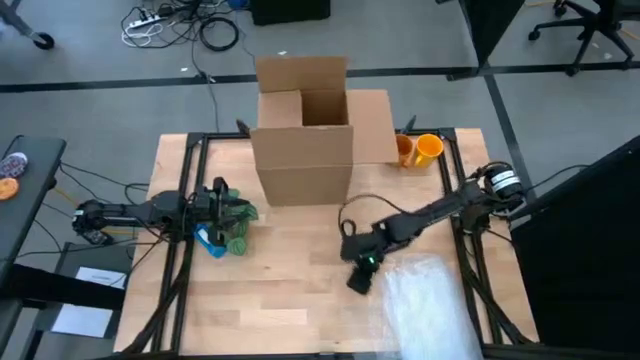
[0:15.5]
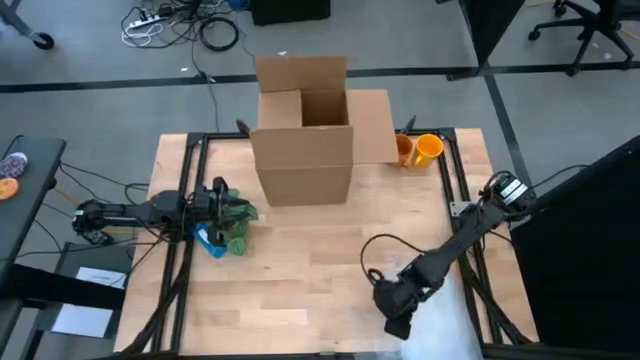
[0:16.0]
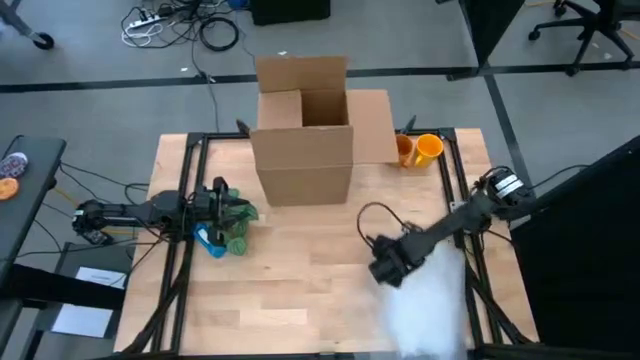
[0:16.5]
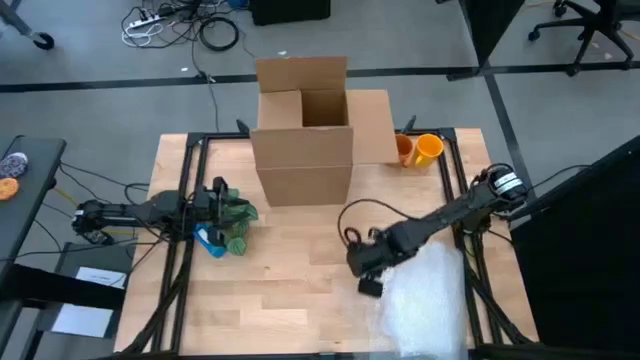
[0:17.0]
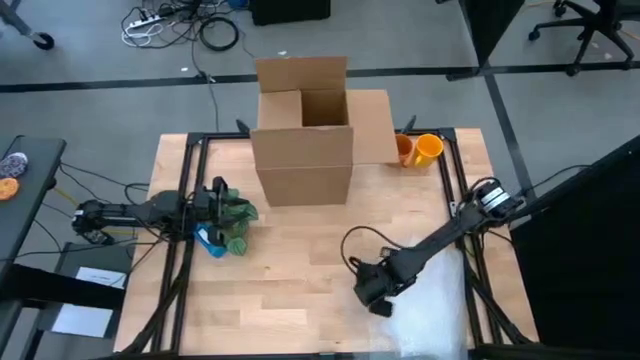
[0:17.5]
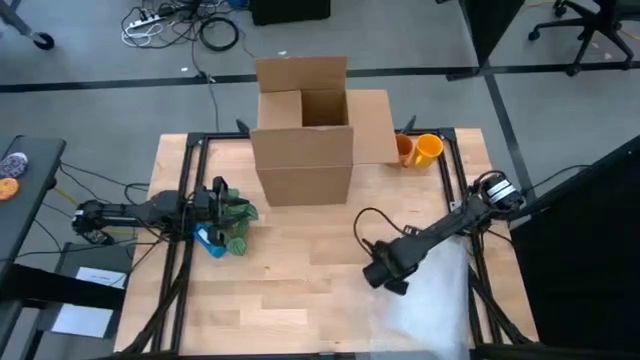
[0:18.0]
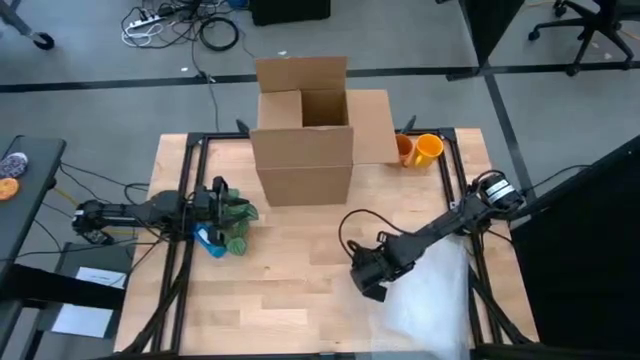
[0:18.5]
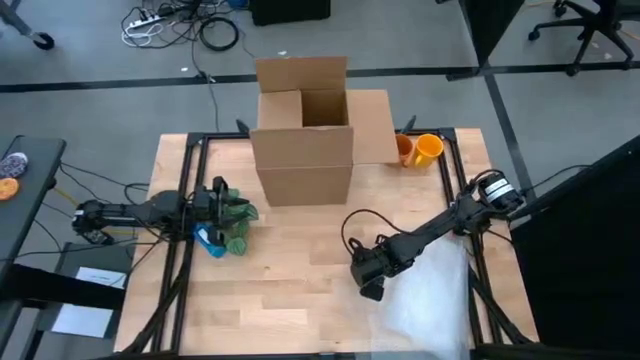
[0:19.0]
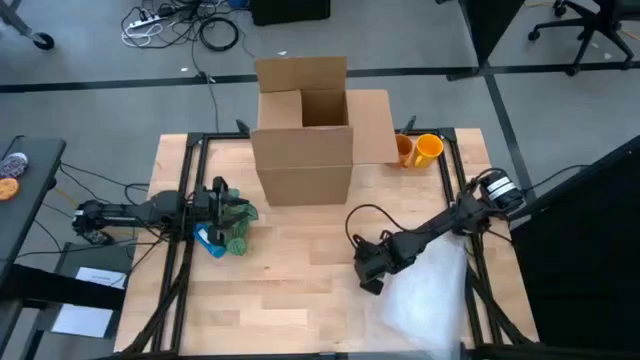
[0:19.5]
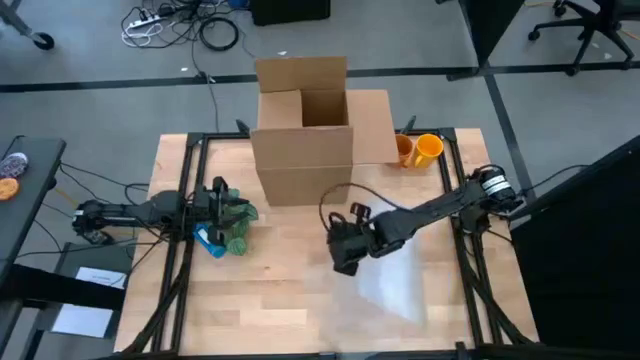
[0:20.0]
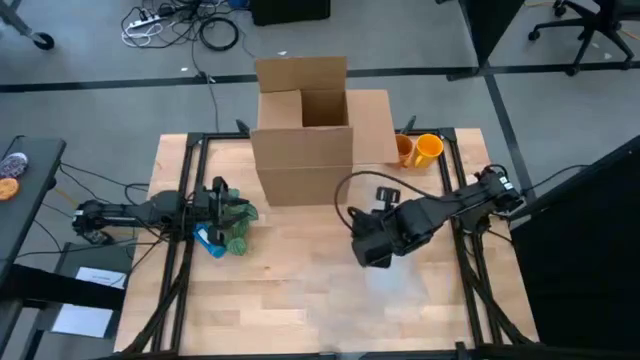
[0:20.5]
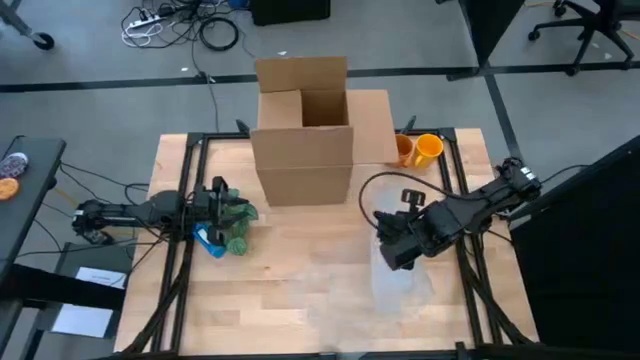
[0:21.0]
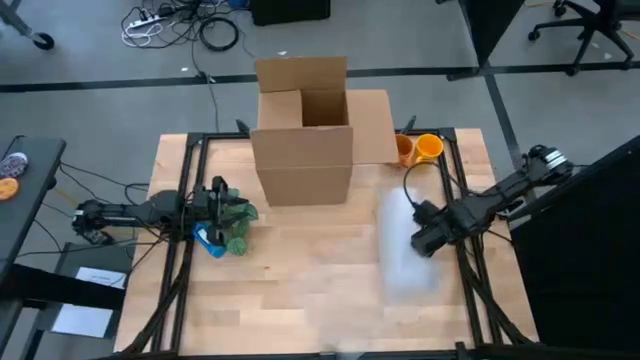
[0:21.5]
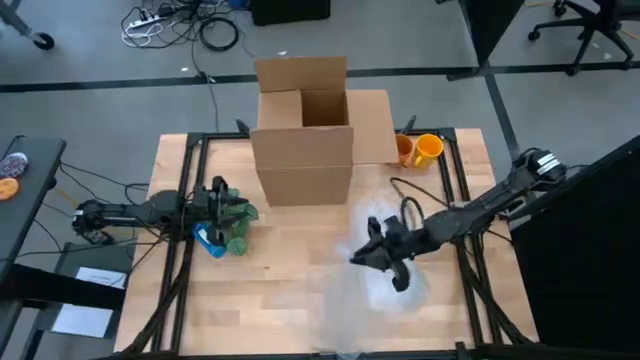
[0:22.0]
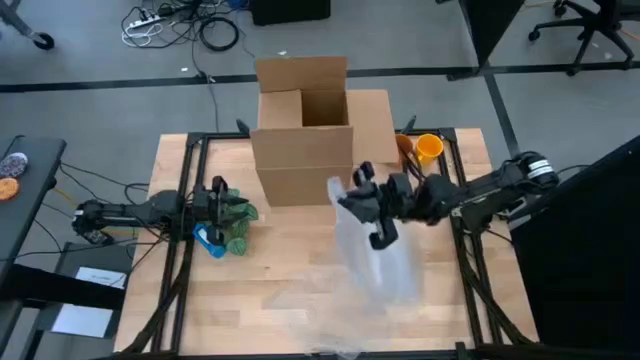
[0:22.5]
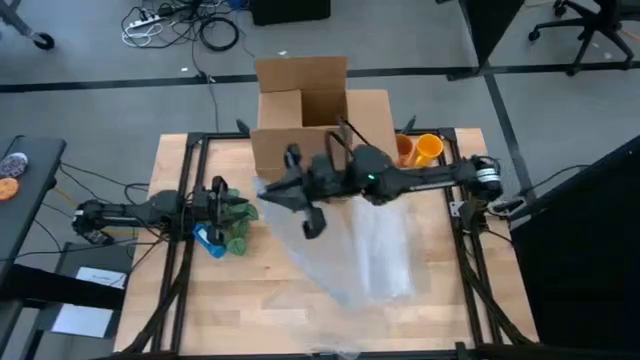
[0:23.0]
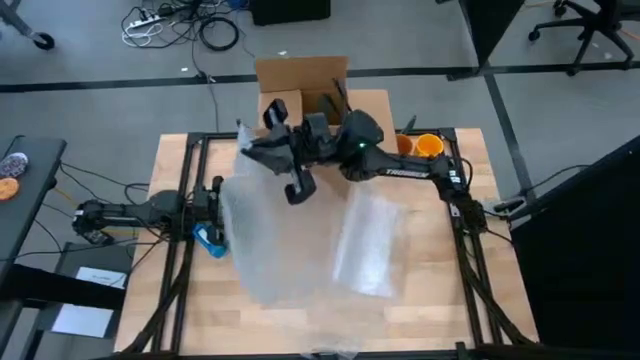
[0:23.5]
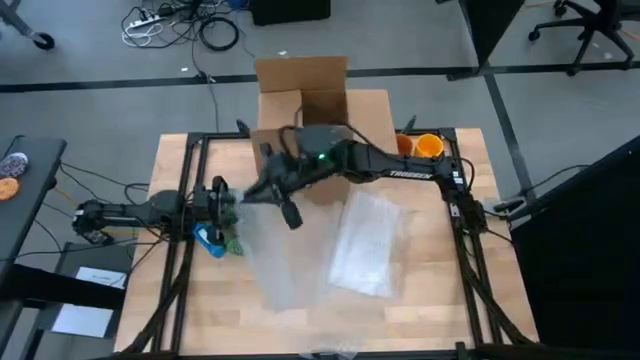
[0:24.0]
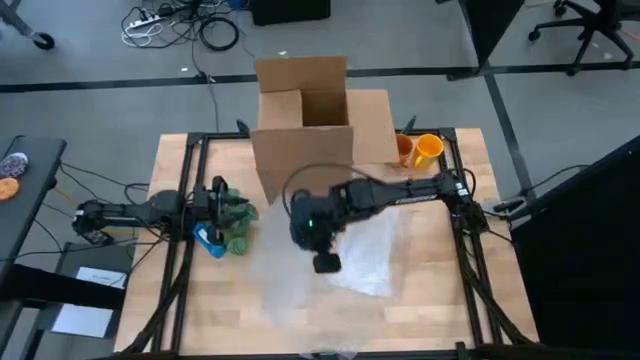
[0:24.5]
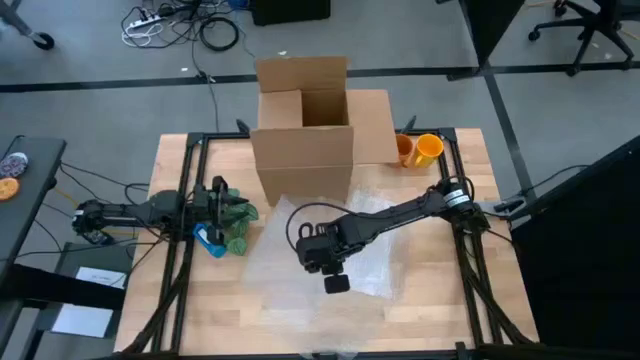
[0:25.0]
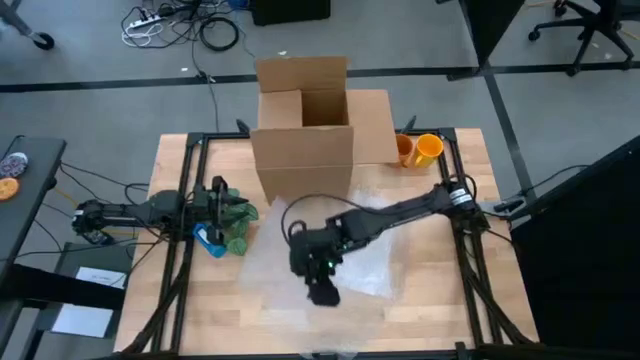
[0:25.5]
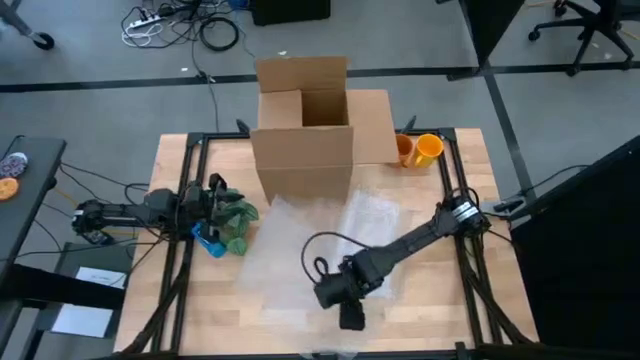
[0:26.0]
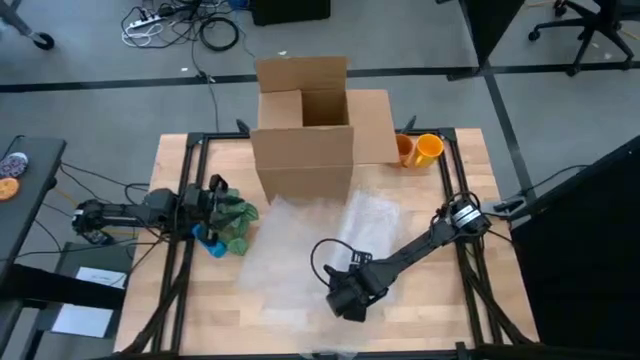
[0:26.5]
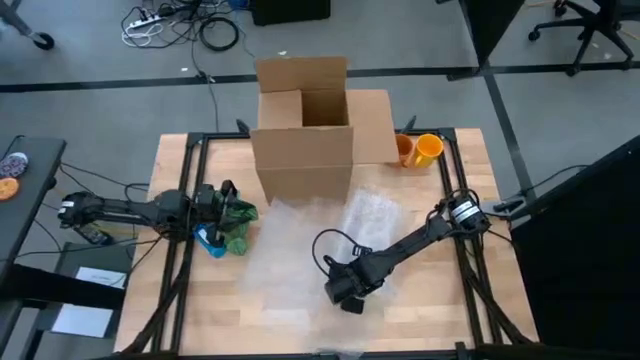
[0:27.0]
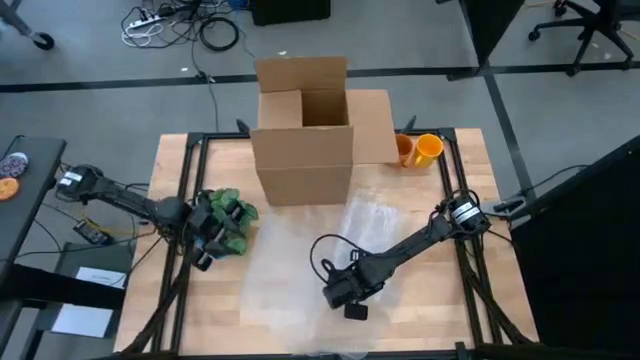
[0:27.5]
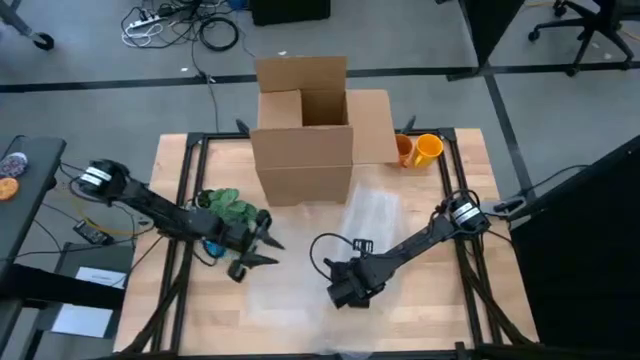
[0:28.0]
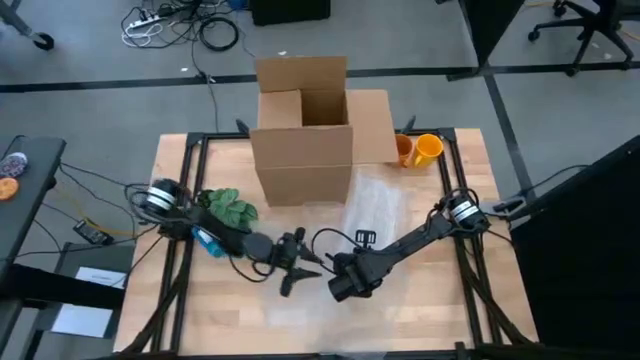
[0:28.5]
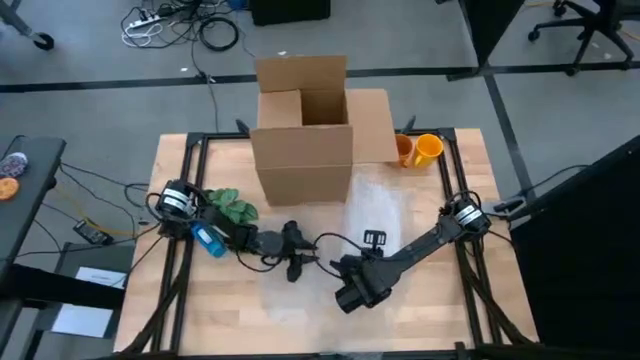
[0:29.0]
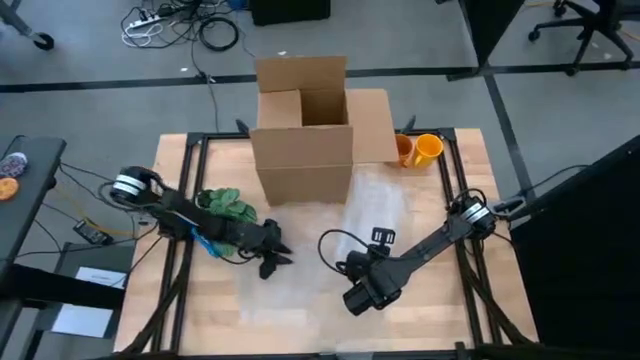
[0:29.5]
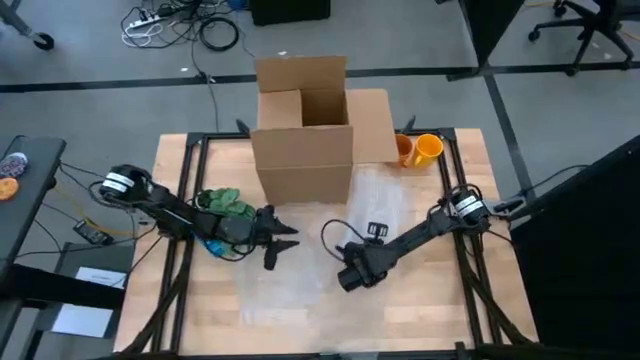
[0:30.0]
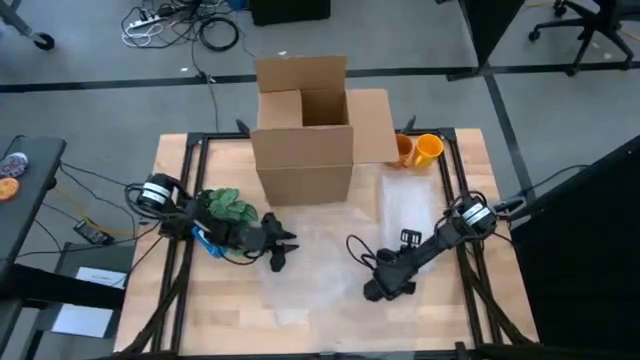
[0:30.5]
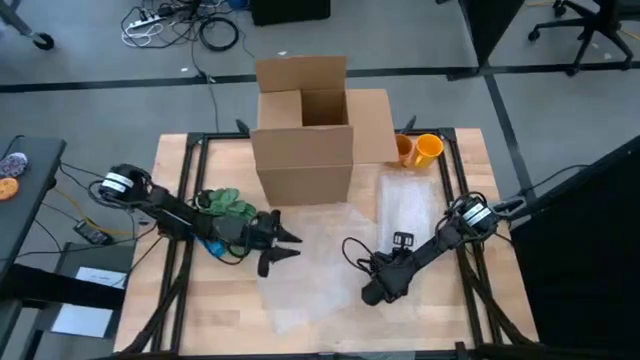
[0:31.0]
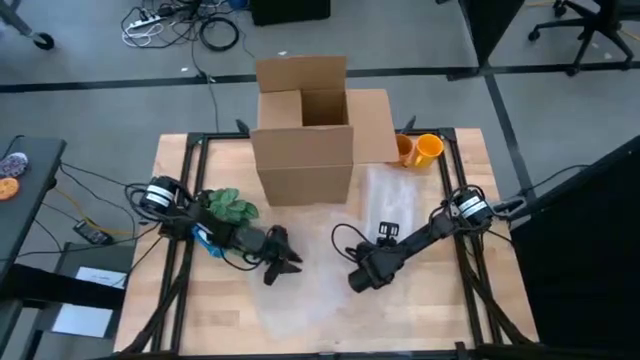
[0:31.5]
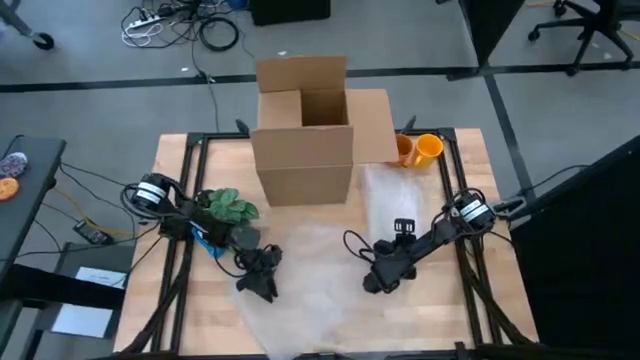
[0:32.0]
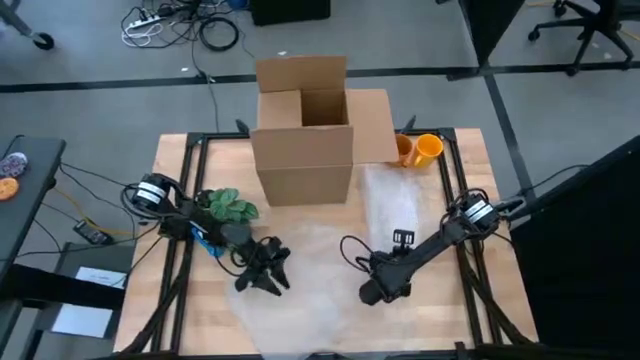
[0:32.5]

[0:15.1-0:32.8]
Task: wrap mug
Wrap the yellow mug with the bubble wrap

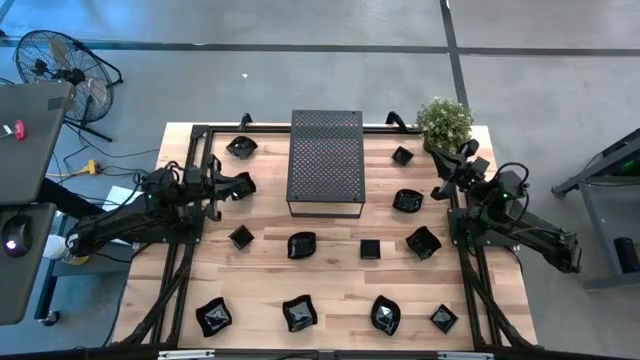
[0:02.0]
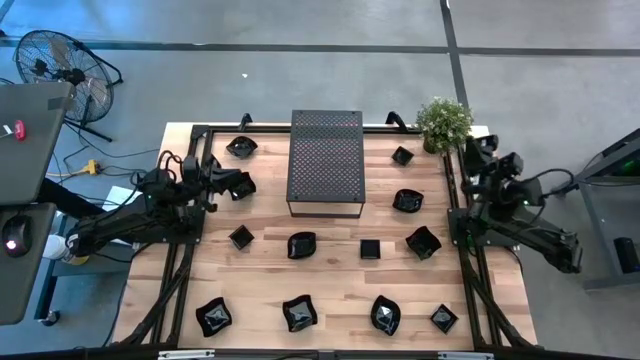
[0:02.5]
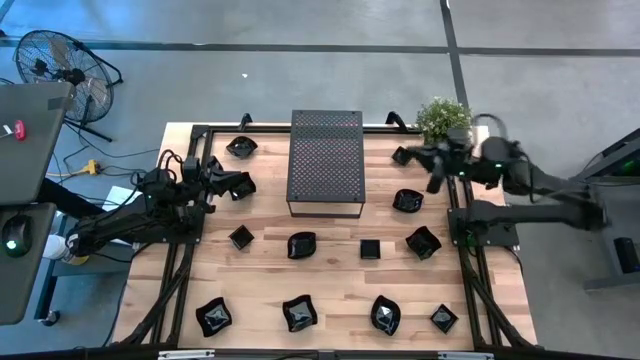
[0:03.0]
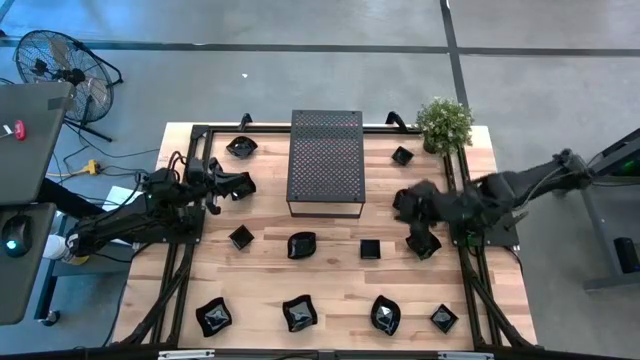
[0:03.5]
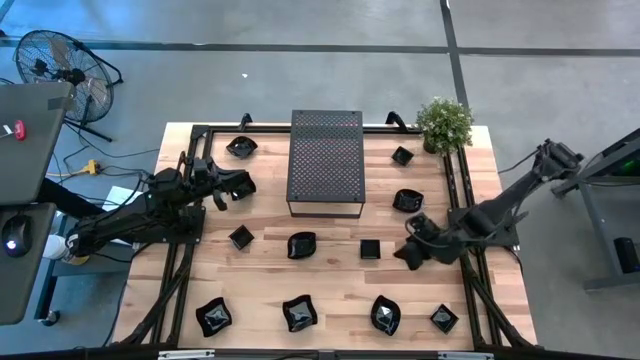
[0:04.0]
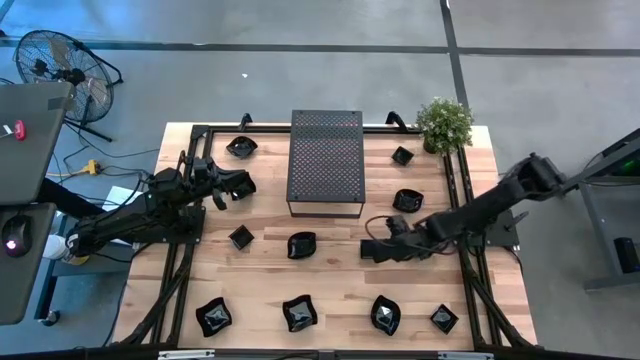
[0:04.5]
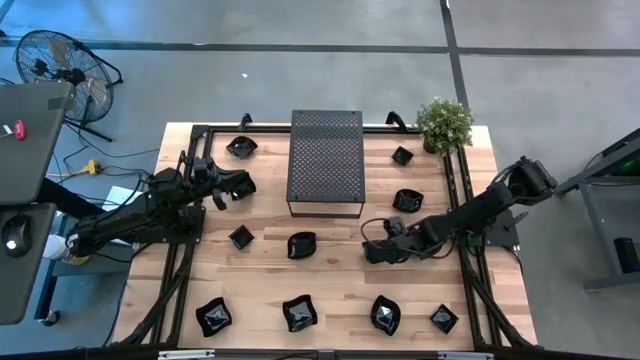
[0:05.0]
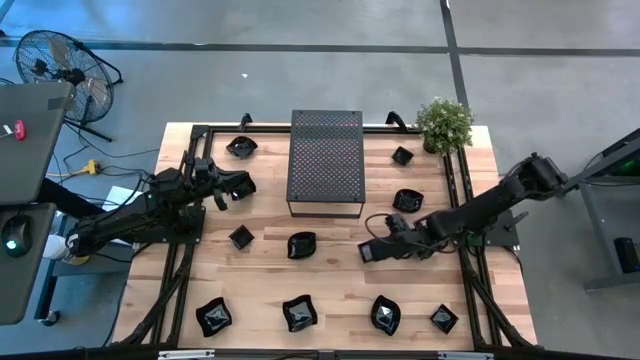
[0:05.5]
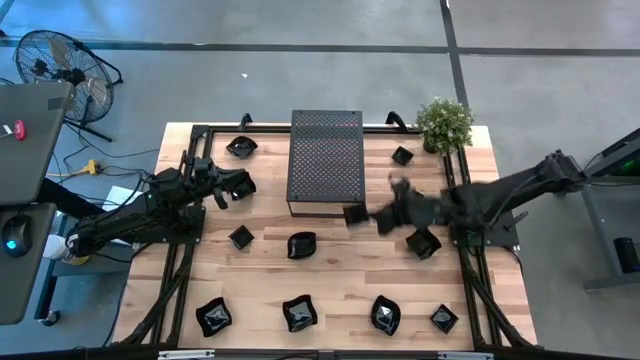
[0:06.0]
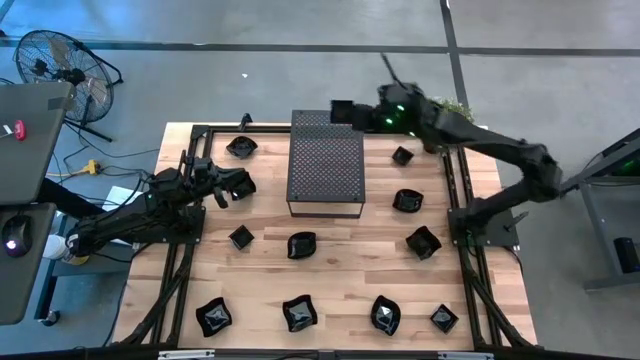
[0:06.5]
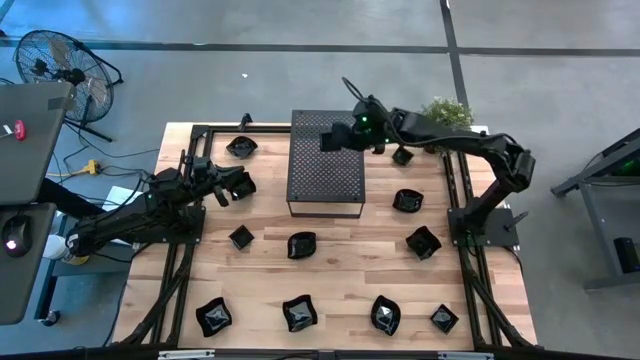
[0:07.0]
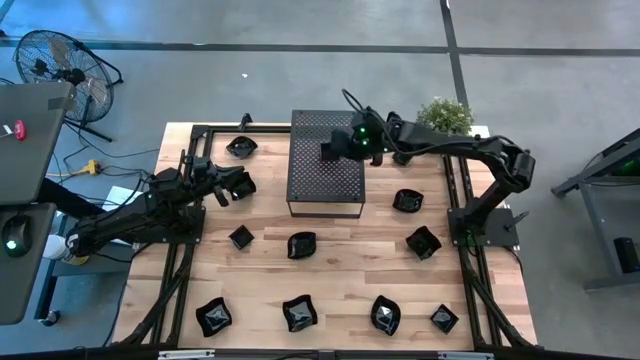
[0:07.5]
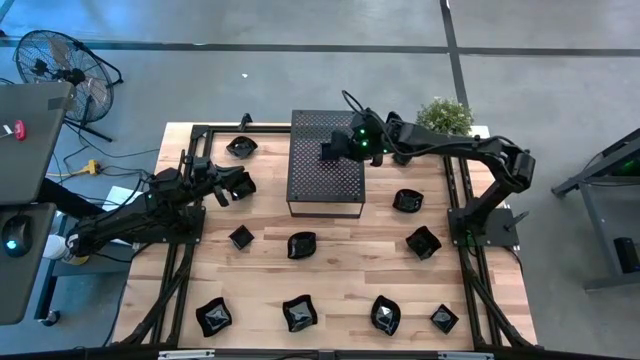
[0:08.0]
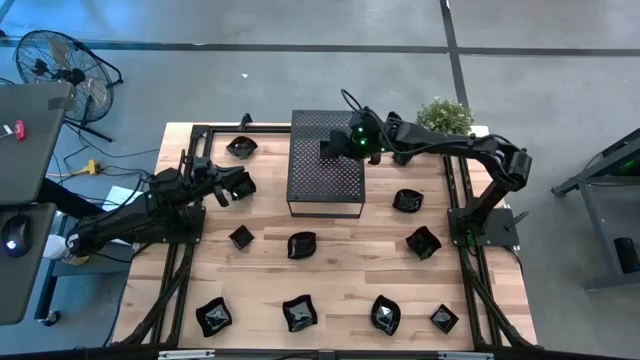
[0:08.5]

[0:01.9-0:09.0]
Task: Pick & Place Mini shaped plates
Put the square plate on the shelf
